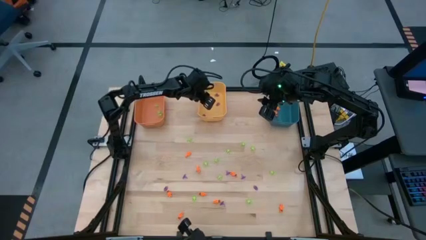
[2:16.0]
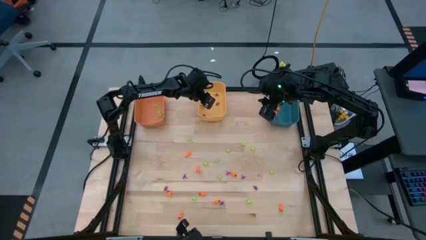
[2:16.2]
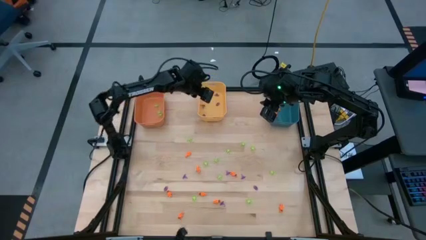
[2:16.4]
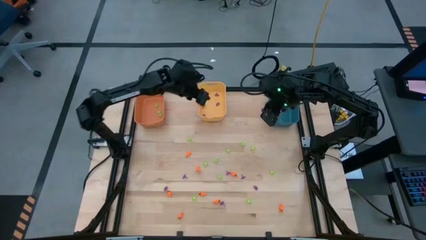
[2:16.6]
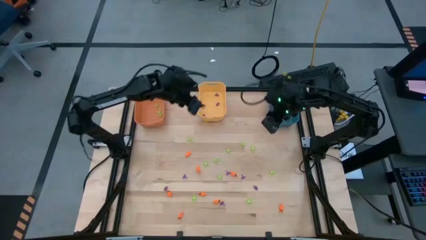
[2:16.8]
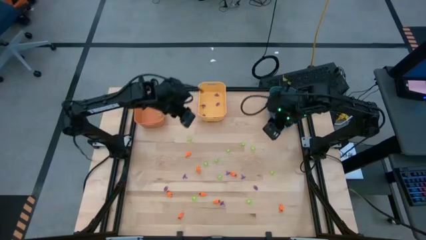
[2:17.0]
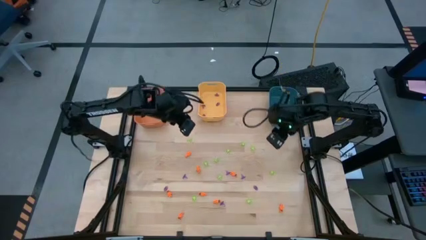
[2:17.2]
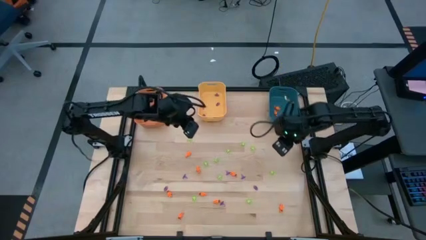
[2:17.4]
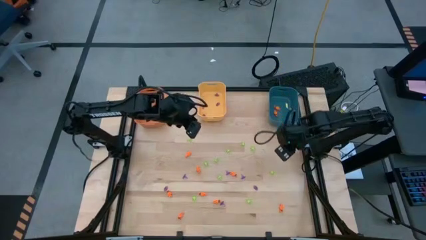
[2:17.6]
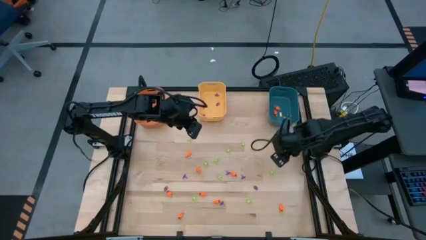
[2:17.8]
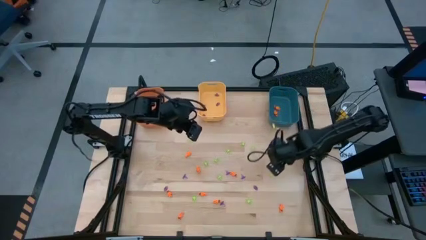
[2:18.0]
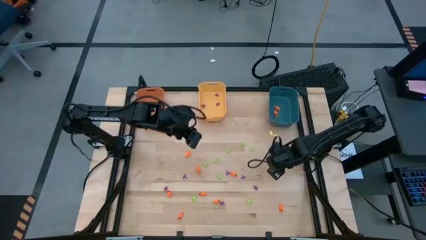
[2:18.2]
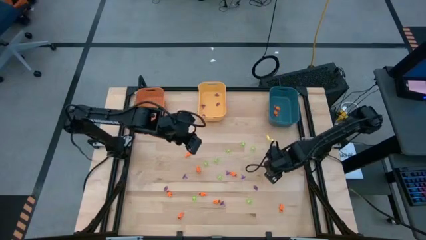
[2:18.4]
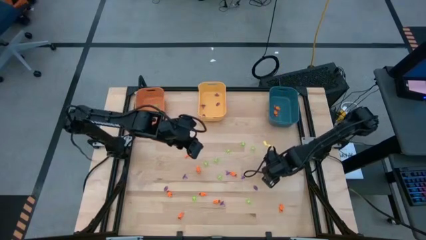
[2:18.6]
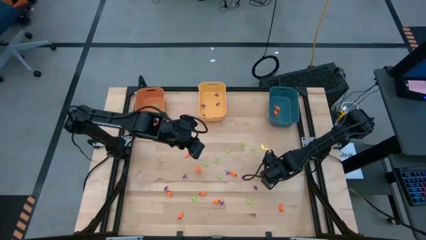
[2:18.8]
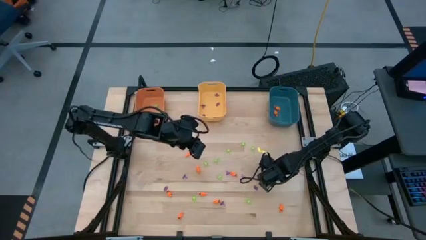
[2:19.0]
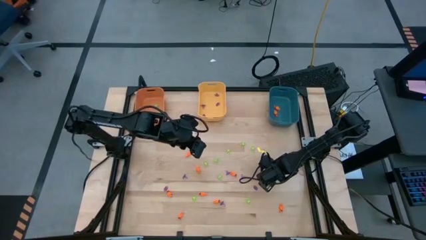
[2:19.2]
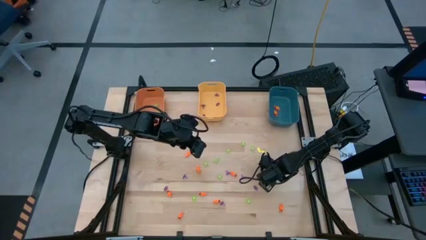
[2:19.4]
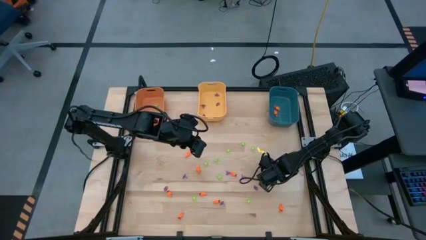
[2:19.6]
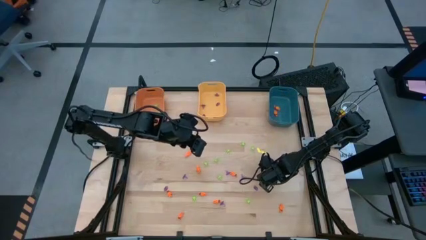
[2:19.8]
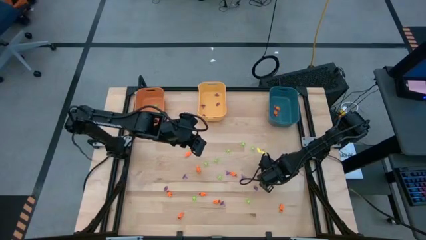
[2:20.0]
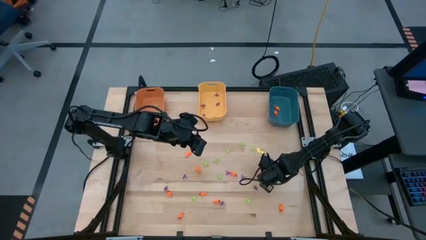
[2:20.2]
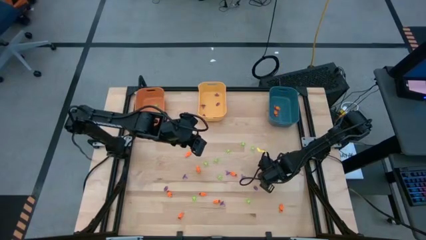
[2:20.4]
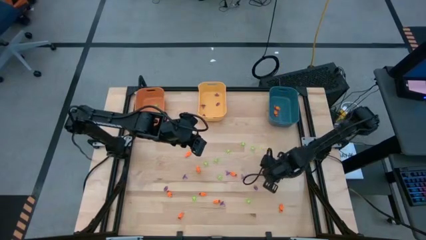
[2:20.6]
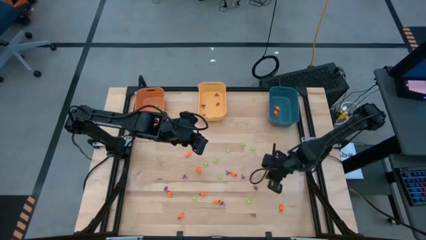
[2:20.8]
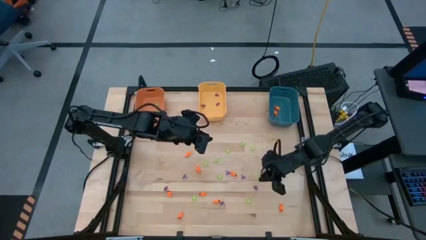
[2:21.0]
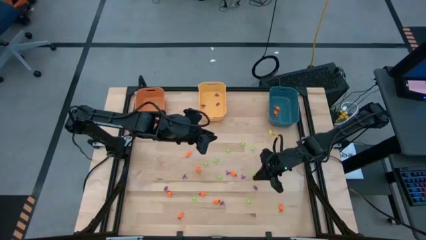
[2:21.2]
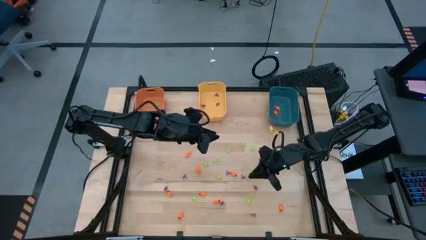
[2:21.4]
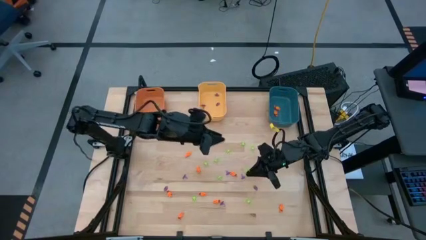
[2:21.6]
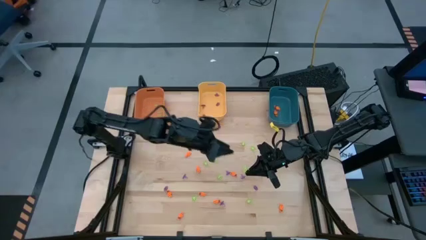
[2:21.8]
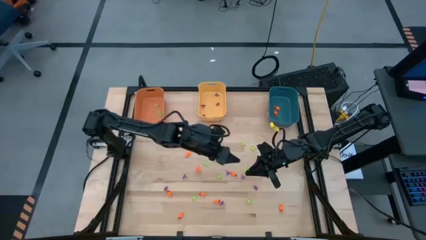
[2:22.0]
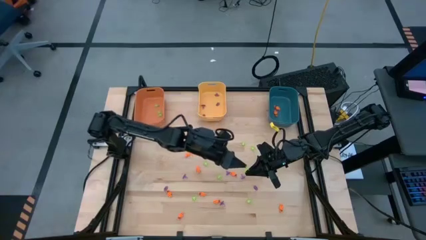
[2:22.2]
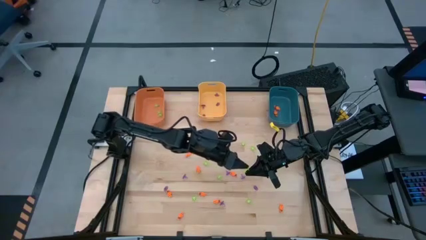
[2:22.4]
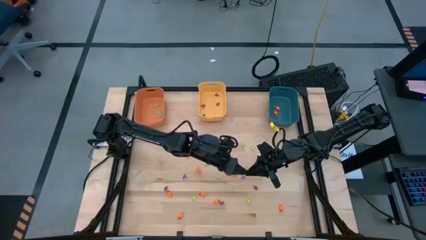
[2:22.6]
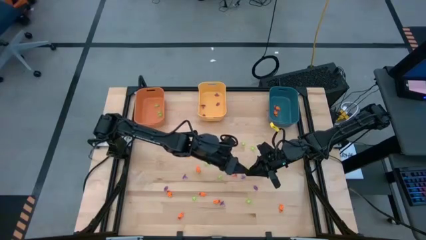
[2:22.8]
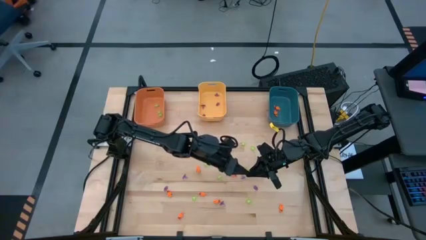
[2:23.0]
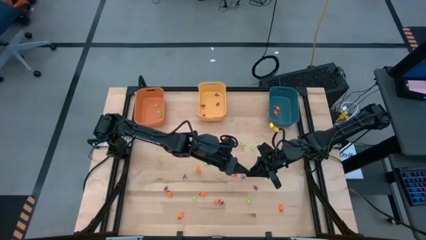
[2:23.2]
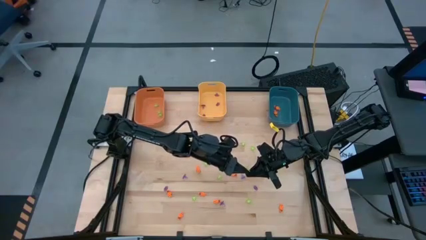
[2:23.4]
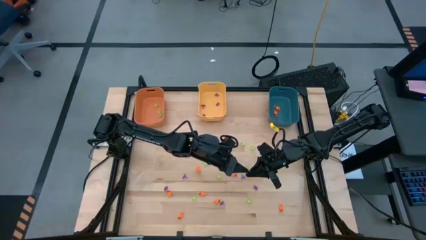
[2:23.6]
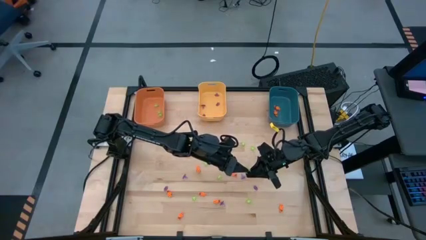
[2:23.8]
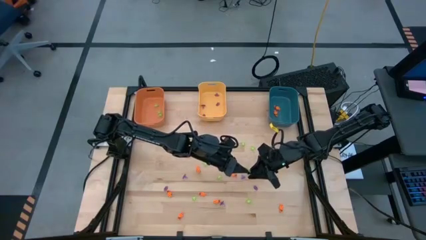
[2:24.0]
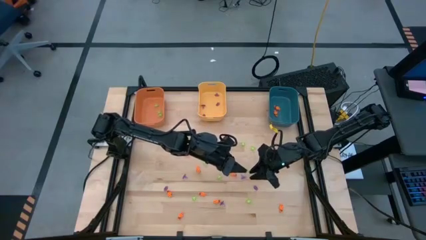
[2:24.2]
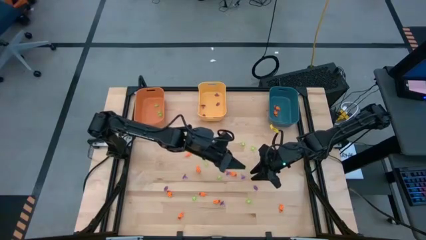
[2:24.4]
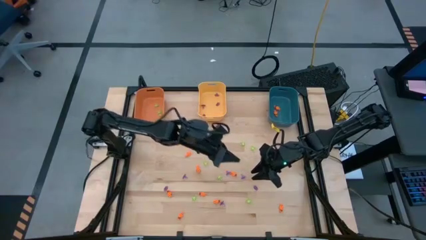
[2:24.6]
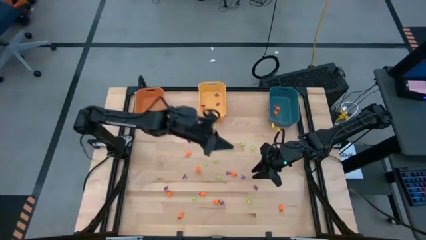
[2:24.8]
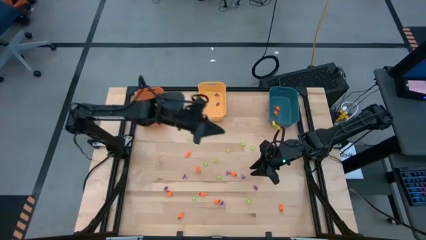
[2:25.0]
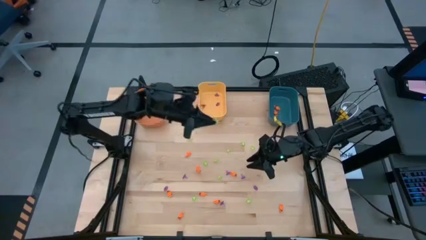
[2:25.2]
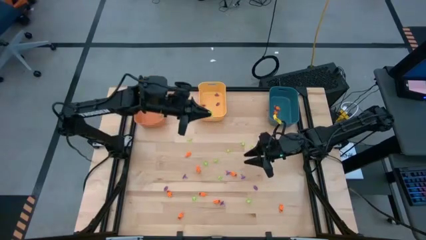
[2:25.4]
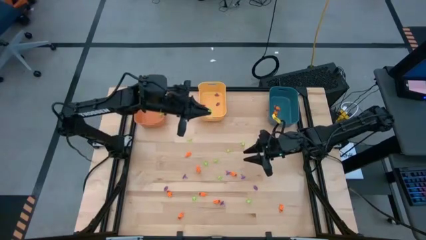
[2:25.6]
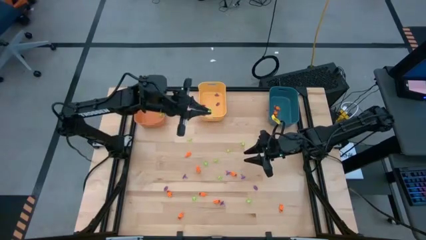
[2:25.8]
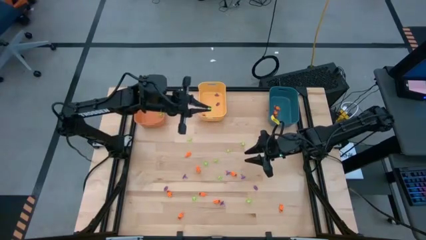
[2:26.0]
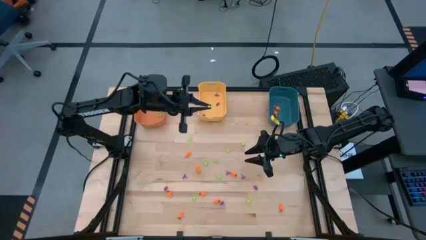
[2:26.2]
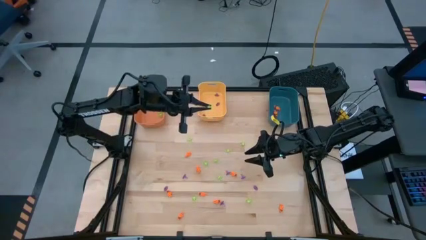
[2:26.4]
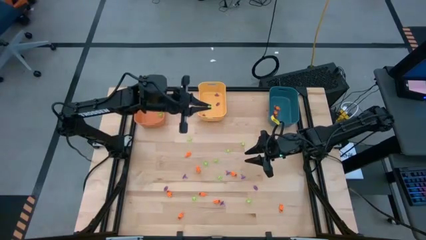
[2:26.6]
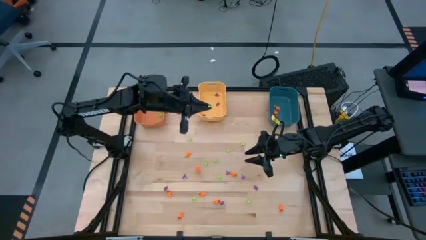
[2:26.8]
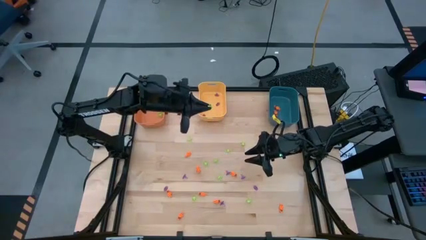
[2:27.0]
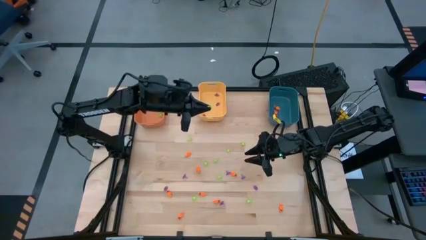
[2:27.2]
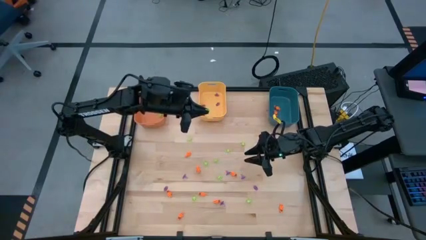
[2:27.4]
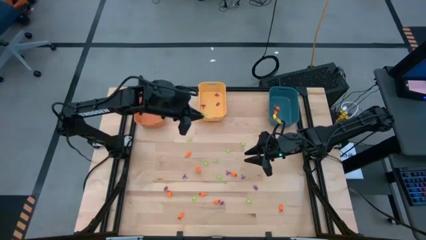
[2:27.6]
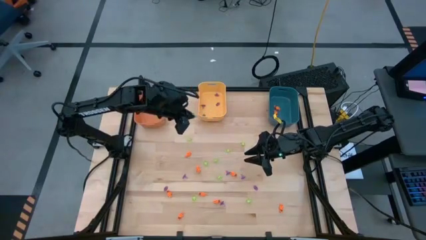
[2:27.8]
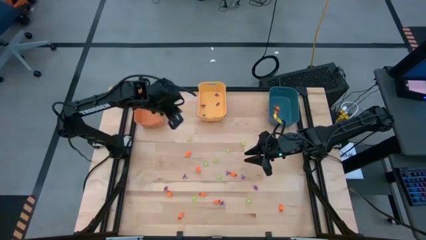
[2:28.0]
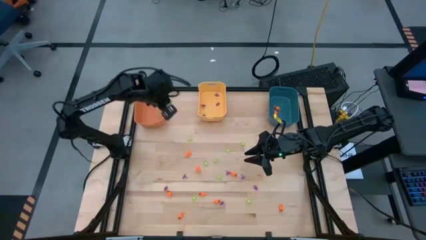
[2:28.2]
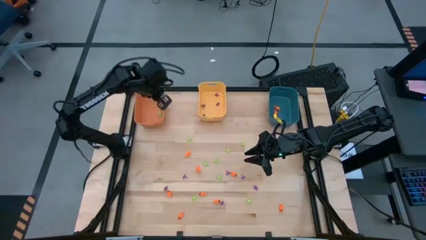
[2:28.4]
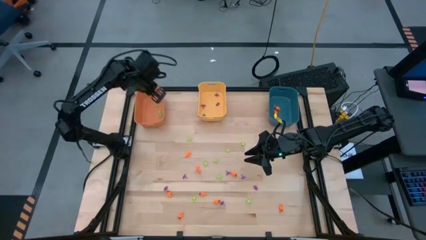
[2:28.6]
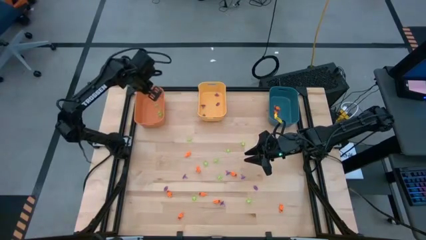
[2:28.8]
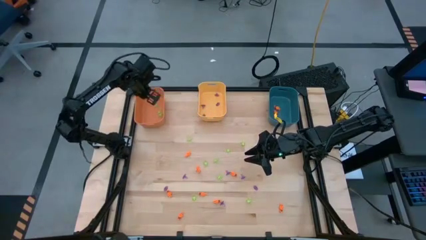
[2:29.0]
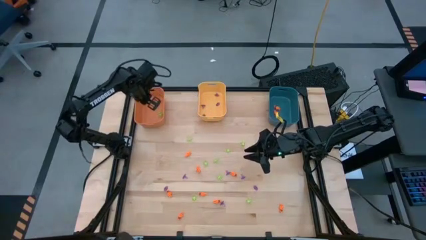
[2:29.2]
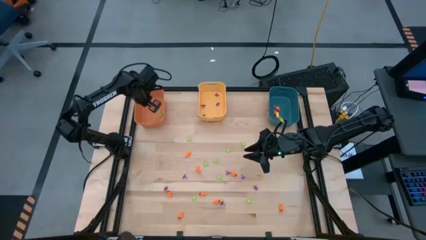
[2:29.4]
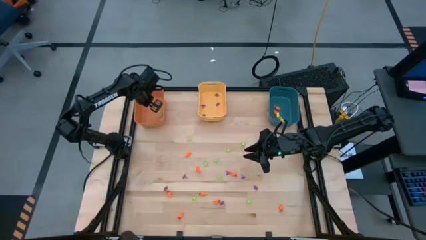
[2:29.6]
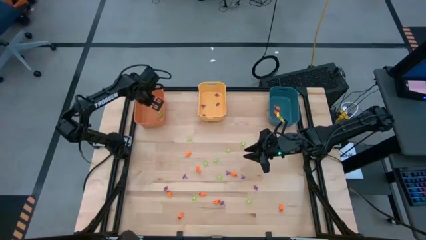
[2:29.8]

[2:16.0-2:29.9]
Task: Sort Halloween decoration
Put the green spider toy into the orange bin

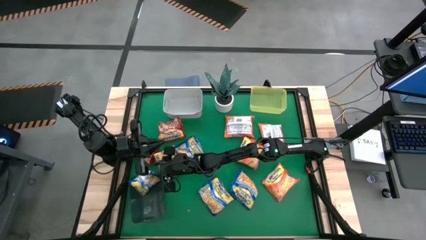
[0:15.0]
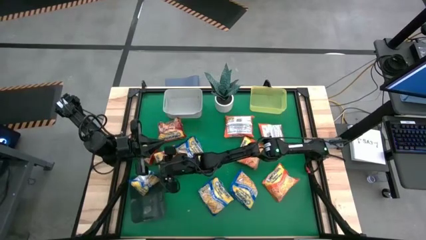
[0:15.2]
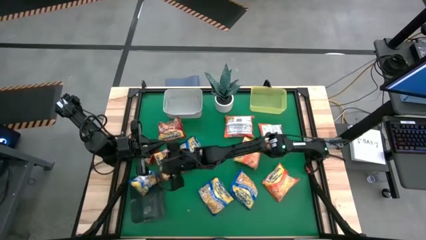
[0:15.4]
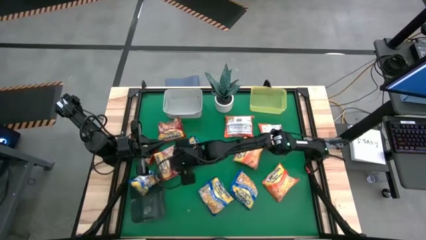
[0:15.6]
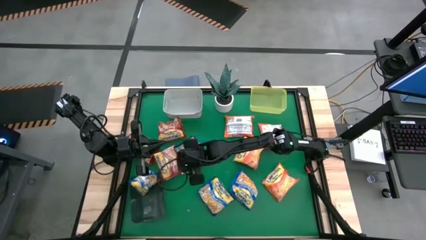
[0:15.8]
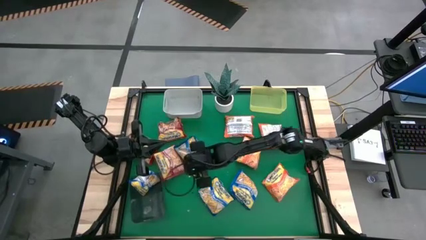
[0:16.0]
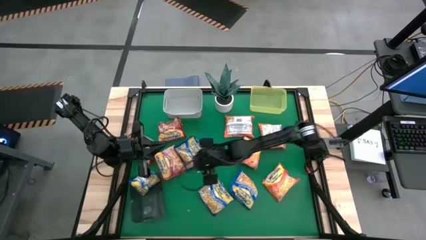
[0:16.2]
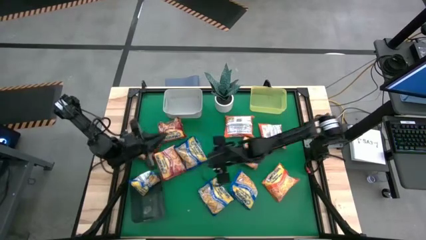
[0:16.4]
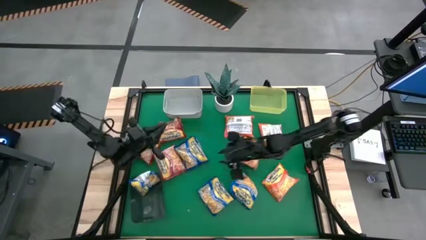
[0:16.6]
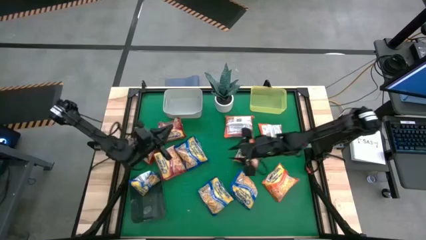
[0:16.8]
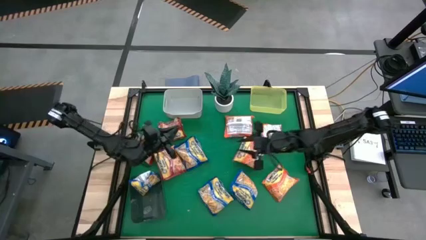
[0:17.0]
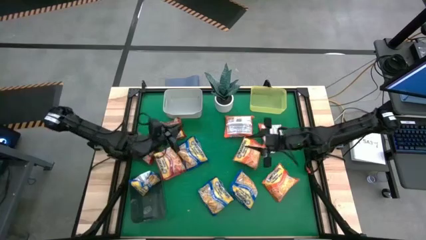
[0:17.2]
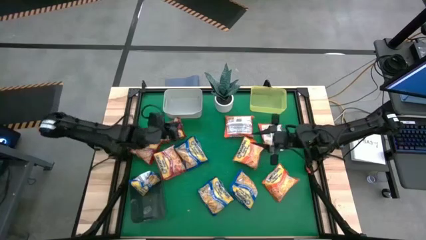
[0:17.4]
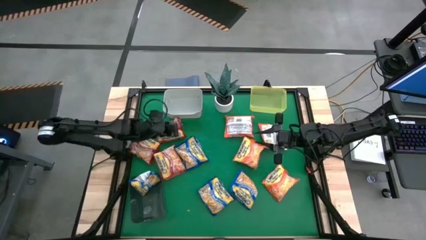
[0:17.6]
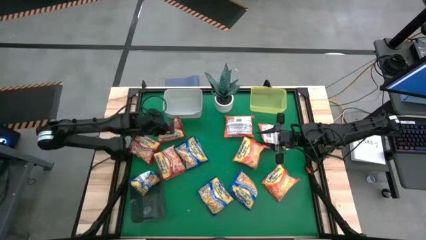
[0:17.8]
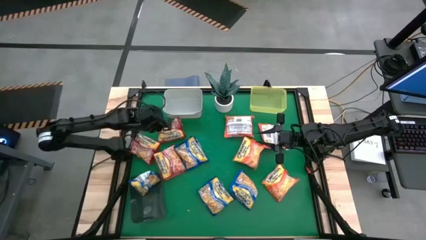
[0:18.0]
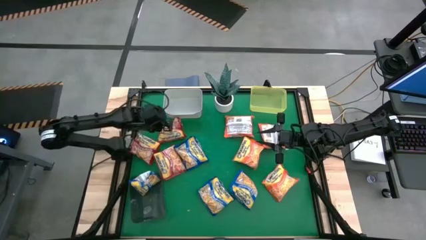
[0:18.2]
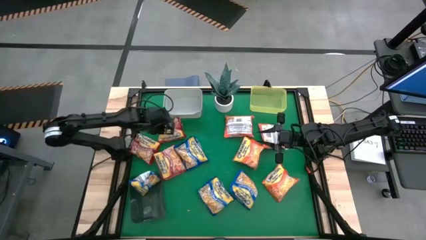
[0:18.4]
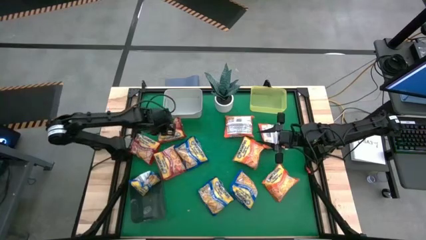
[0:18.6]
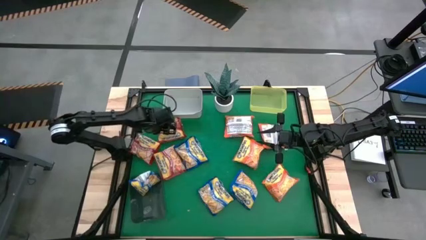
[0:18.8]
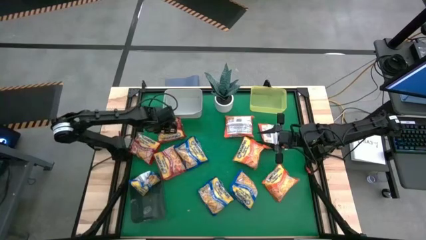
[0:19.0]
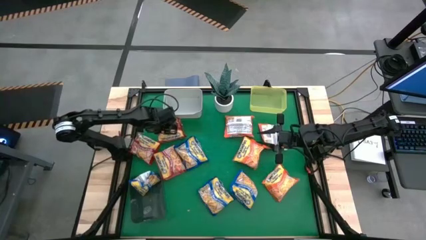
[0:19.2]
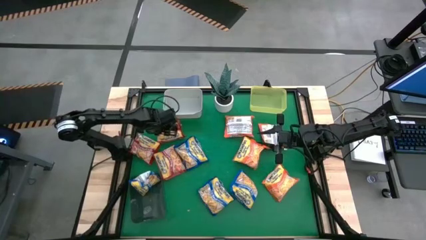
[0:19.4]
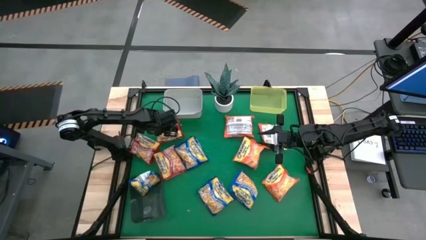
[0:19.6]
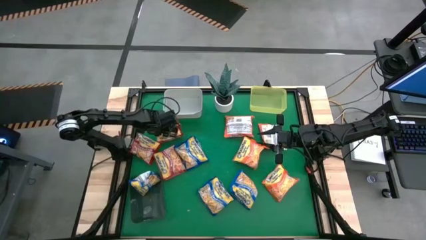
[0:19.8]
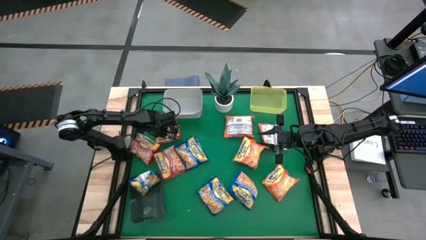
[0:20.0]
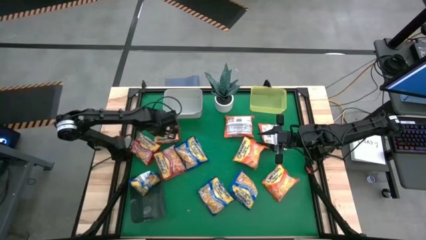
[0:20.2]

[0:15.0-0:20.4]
Task: Sort Maruchan noodles
Put the top left red noodle pack into the white bin
